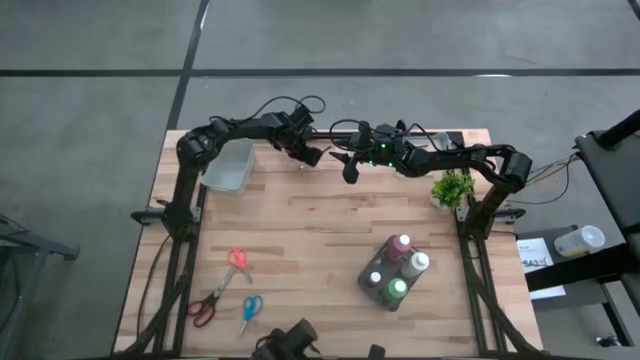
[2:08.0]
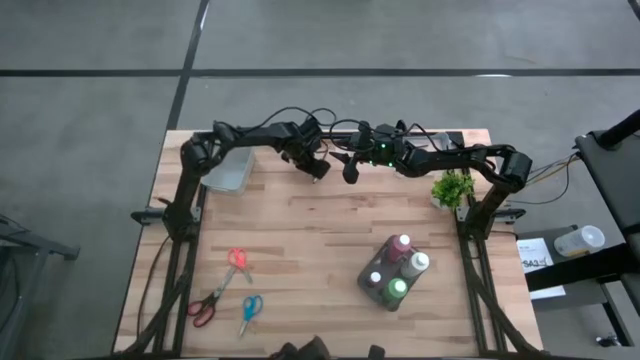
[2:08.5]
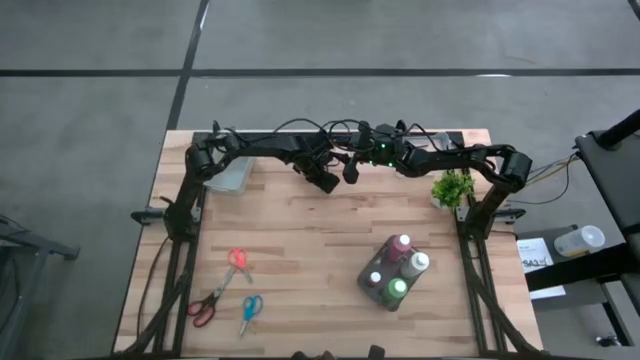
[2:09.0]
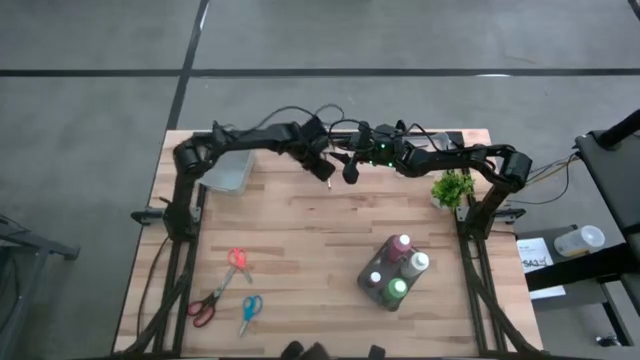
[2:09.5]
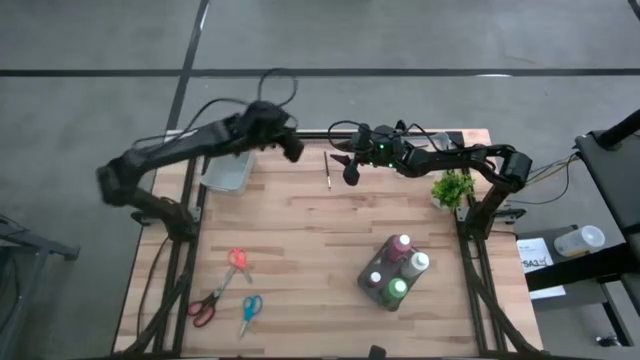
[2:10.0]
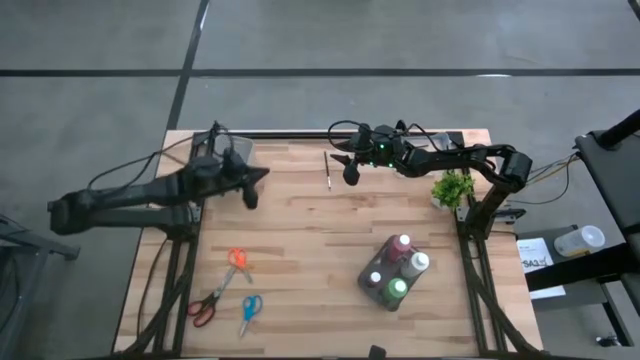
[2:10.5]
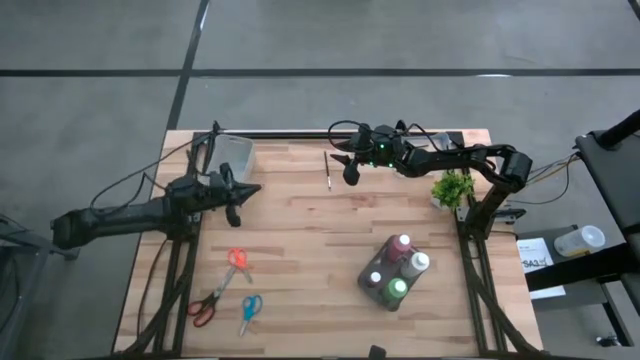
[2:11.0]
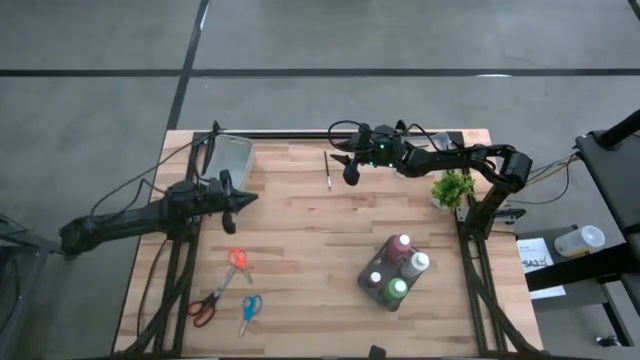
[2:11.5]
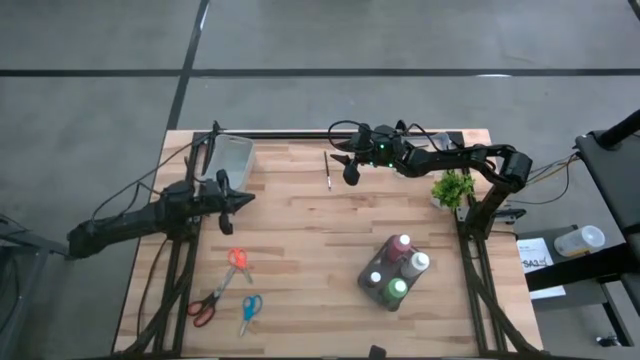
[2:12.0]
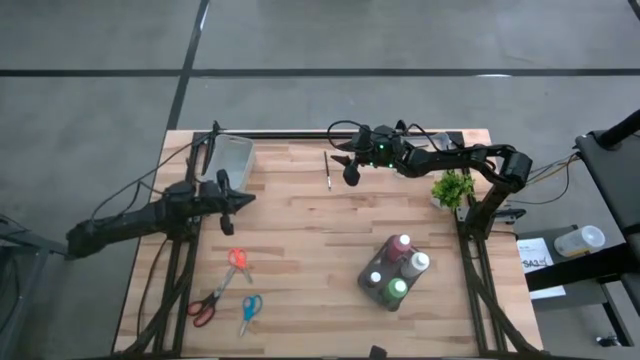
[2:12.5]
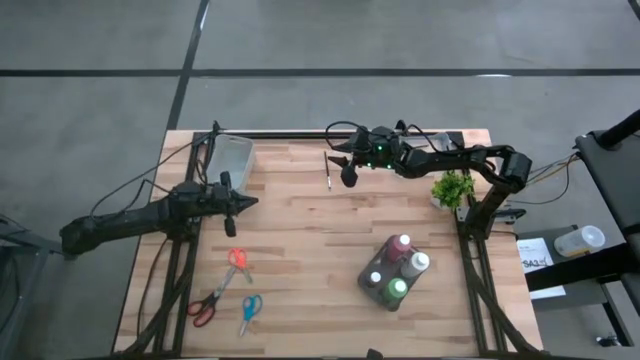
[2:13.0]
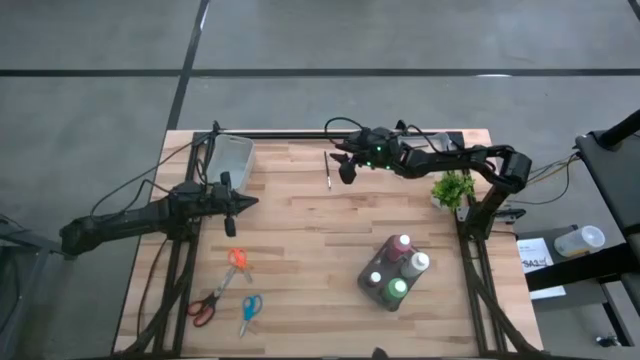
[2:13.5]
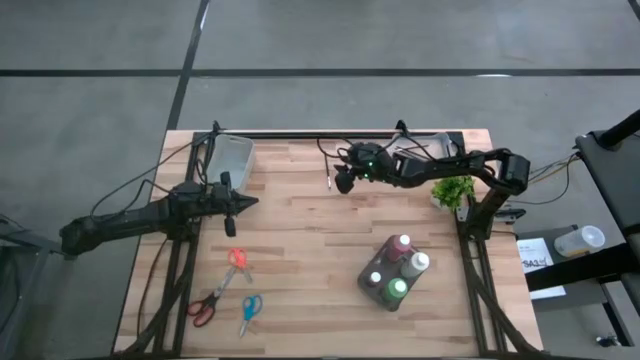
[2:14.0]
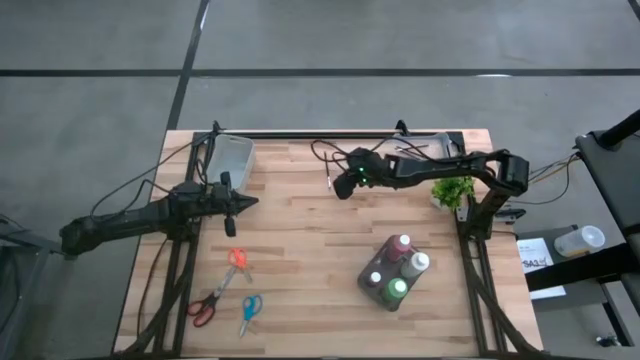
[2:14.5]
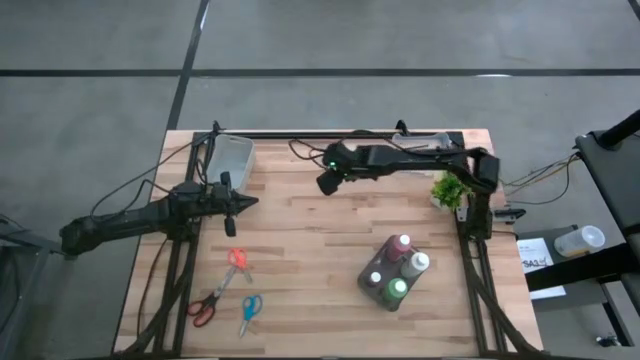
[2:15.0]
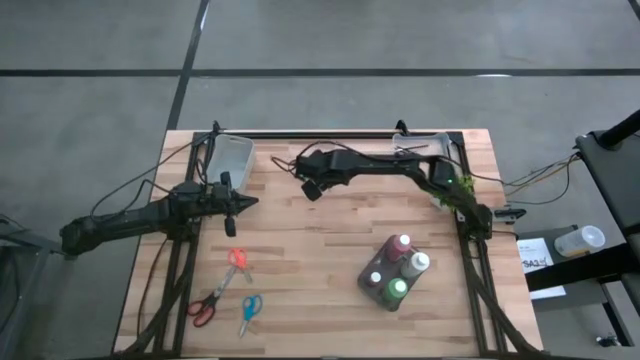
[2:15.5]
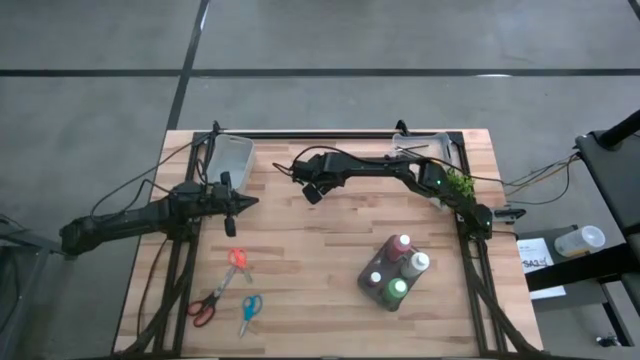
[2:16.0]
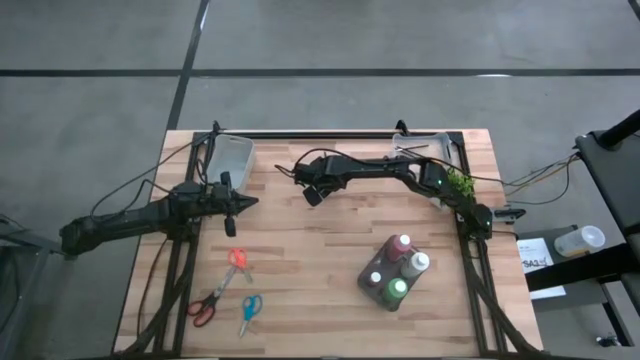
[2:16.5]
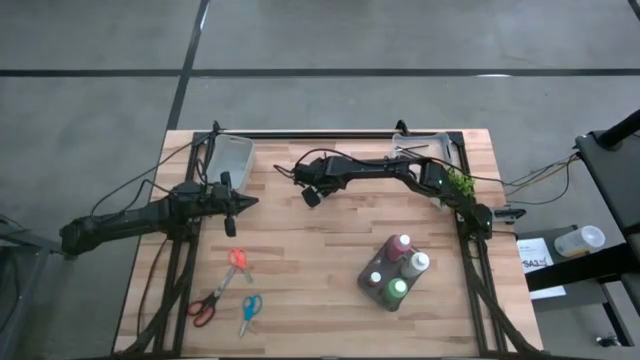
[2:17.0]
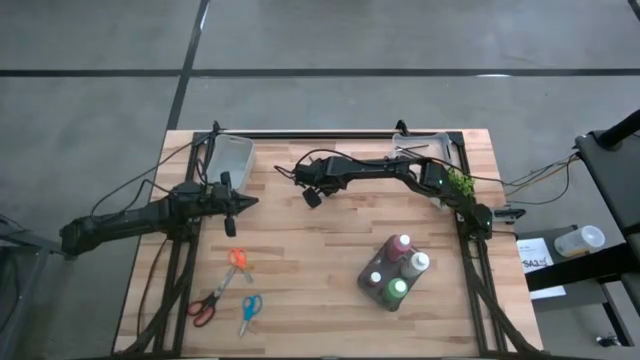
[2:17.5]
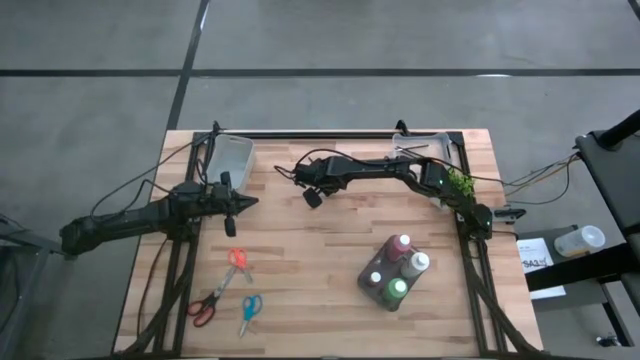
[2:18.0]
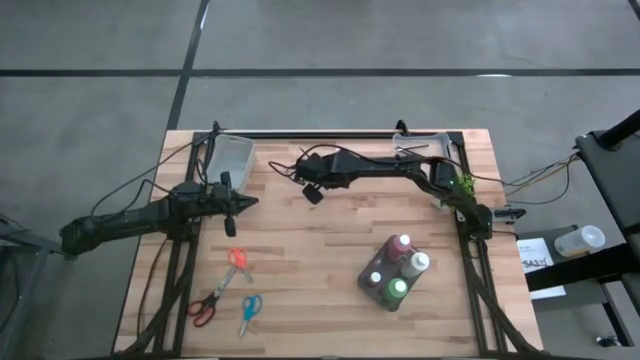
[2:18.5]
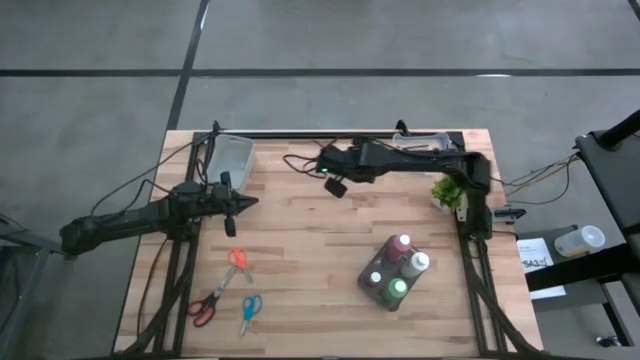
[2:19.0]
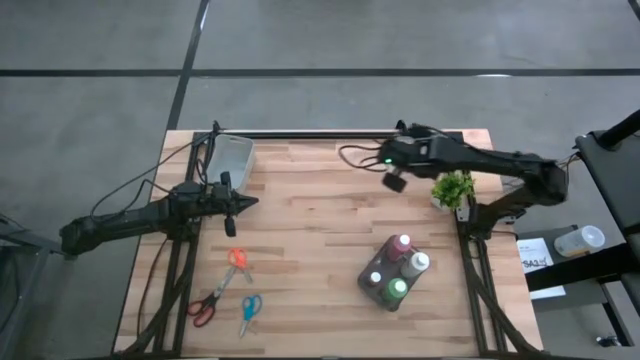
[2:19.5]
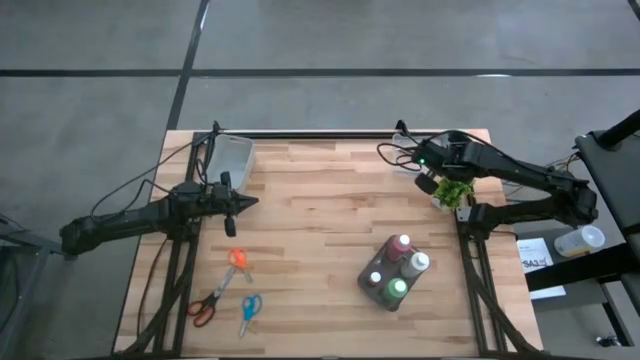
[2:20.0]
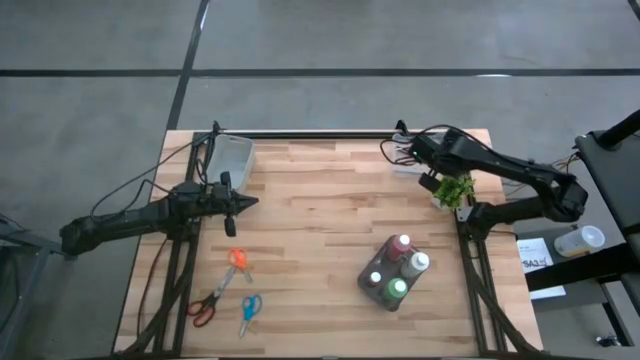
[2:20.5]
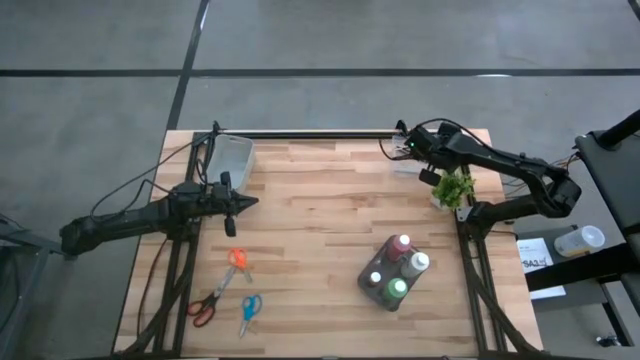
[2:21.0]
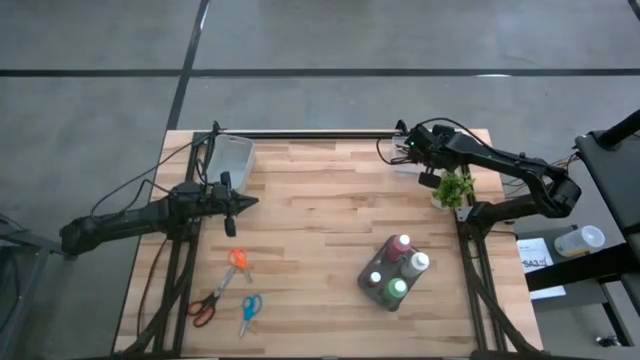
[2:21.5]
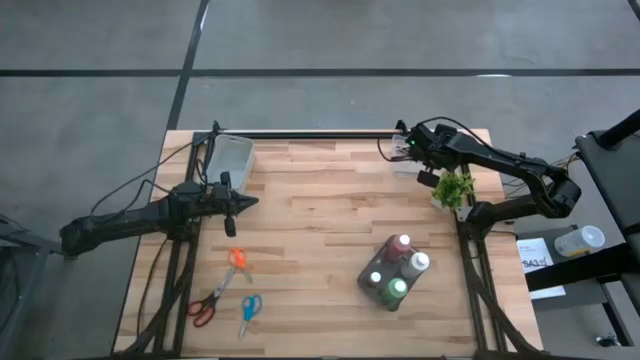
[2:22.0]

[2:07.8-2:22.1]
Task: Pick & Place Paint Supplies
Put the paint brush into the transparent bin

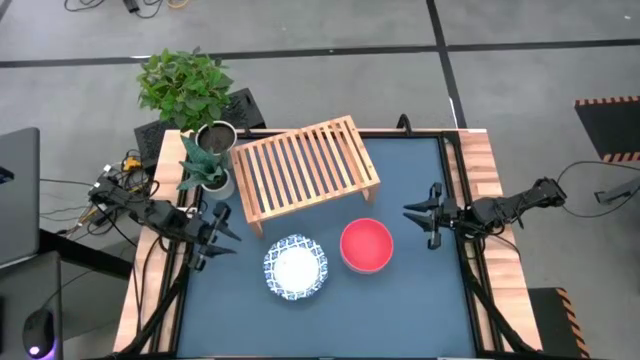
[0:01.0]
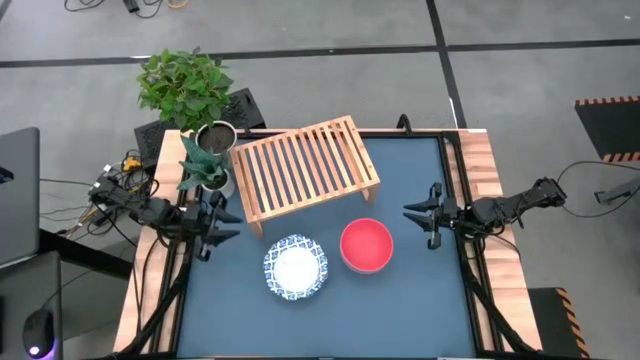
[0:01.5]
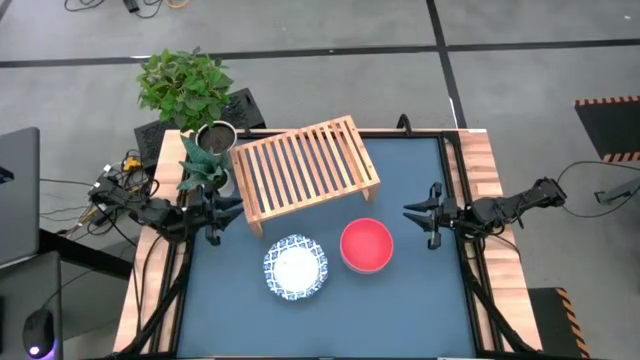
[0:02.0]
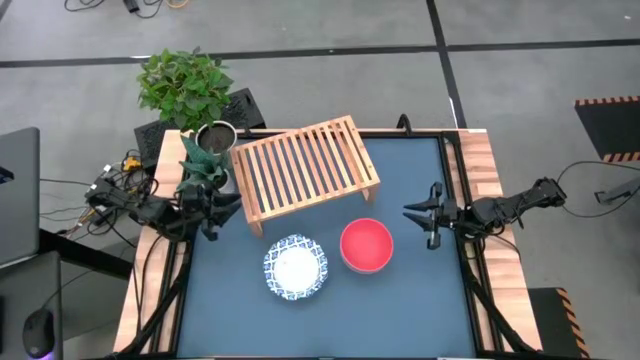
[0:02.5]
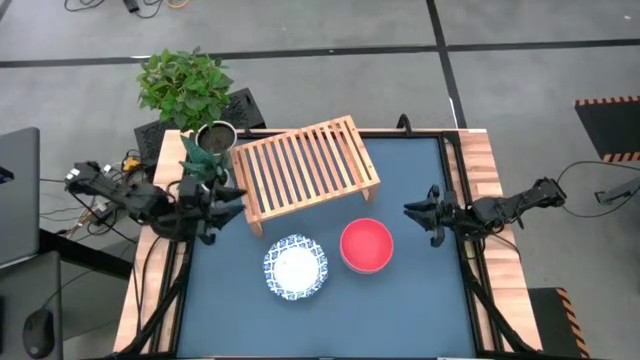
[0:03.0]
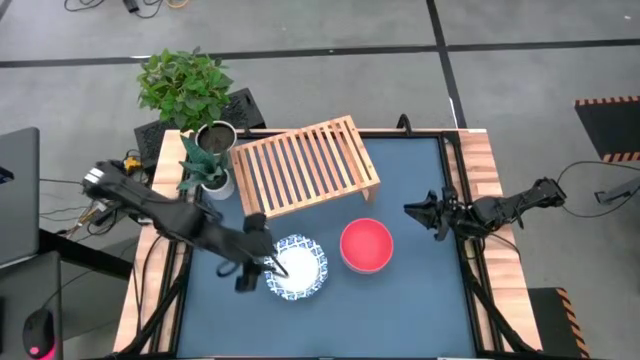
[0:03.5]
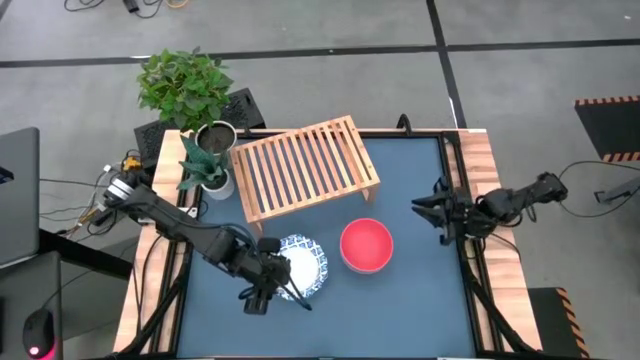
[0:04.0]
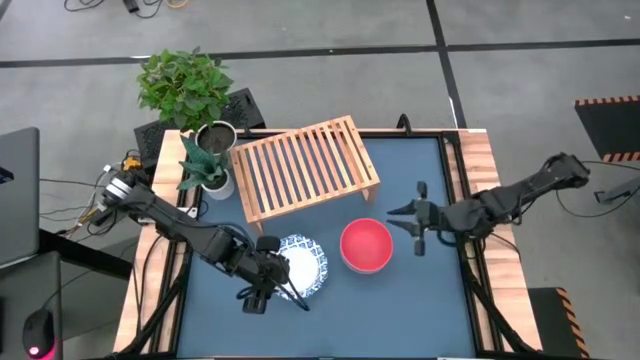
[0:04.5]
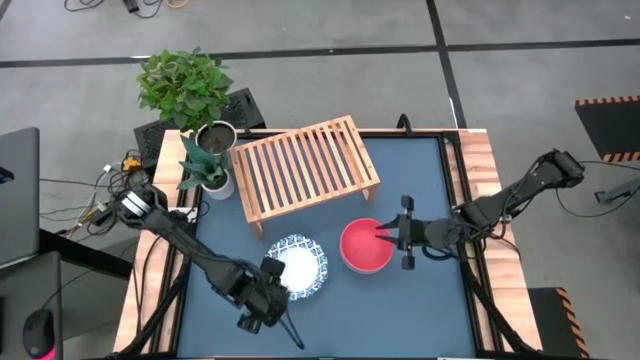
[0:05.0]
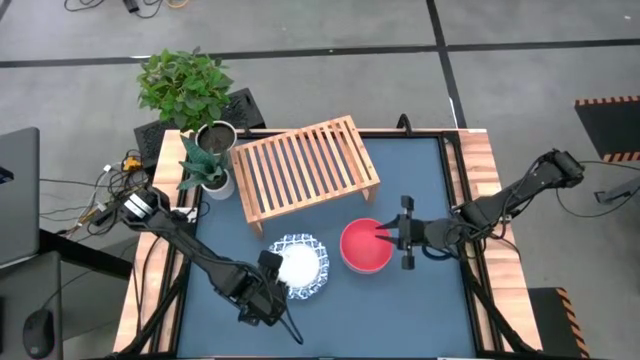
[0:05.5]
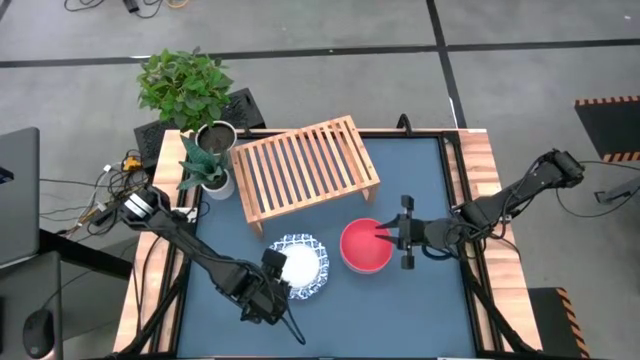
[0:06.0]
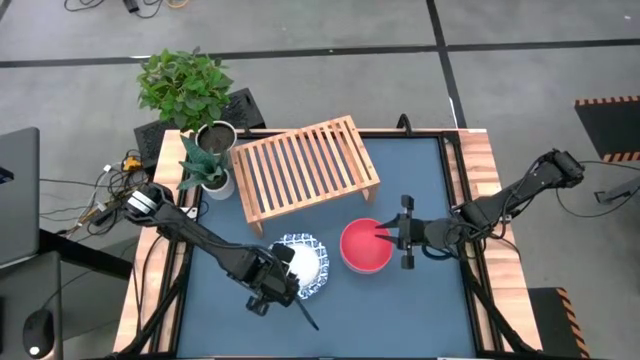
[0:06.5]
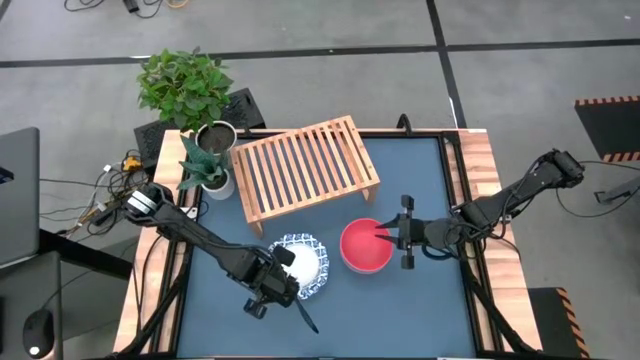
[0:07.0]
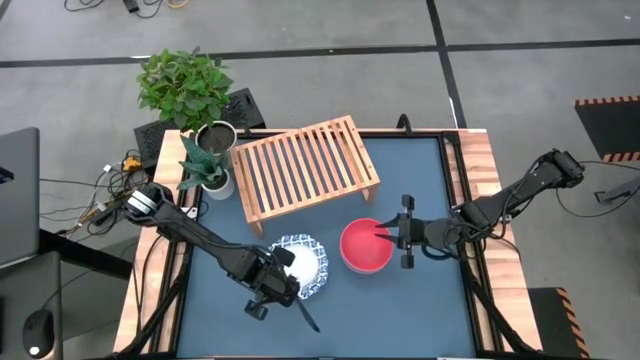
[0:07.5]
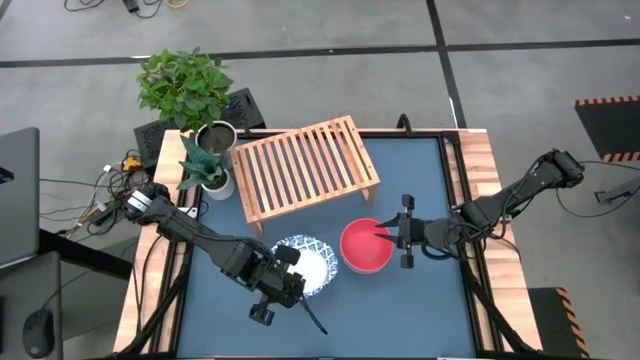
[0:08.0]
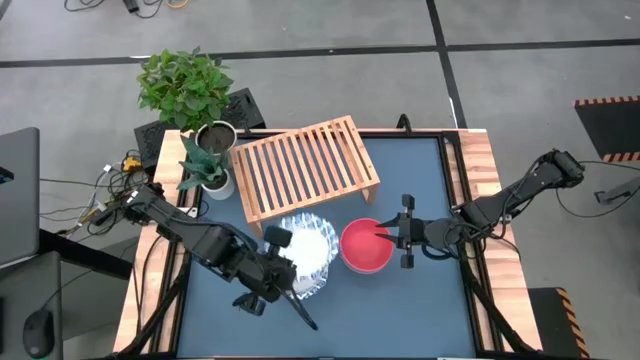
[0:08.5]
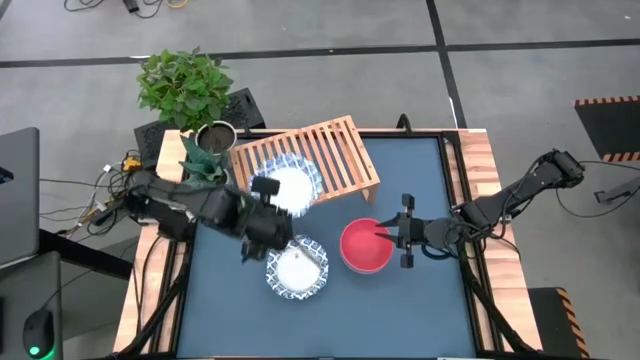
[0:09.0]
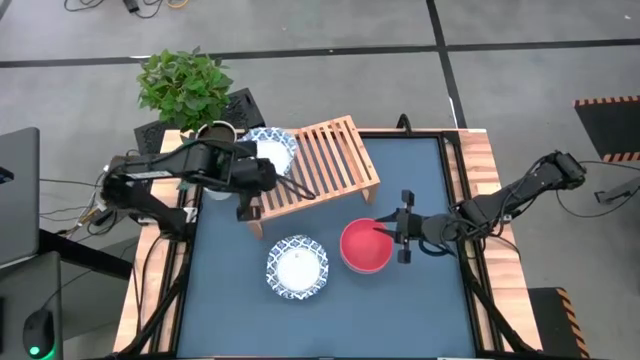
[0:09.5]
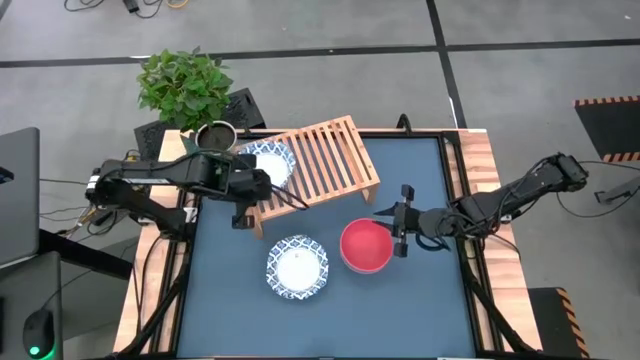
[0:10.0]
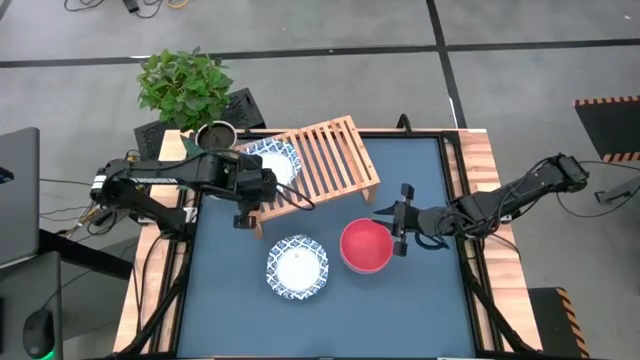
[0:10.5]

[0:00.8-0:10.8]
Task: Place and stack bowls onto a shelf
Put the blue patterned bowl on the shelf
